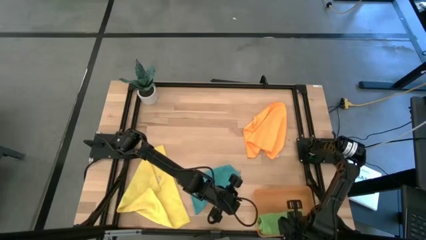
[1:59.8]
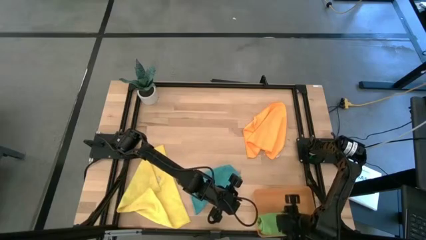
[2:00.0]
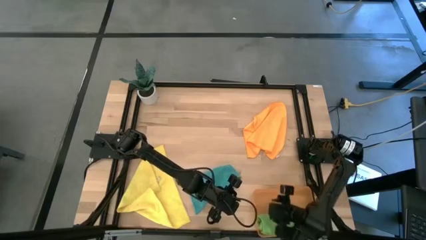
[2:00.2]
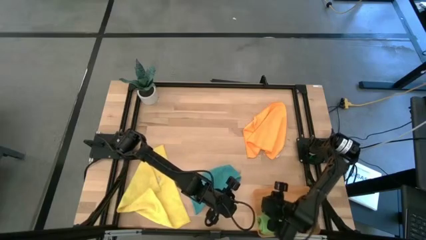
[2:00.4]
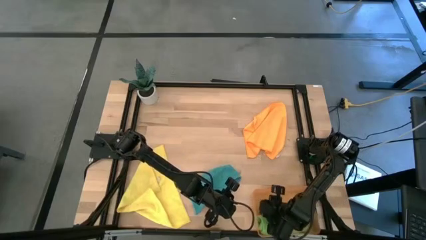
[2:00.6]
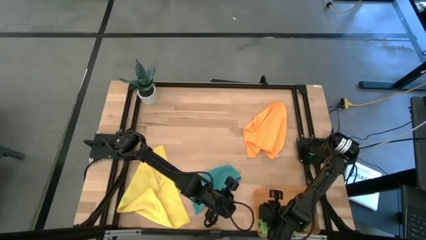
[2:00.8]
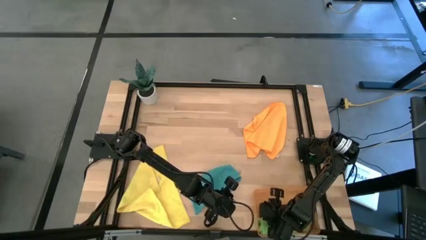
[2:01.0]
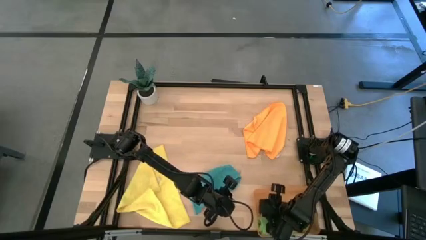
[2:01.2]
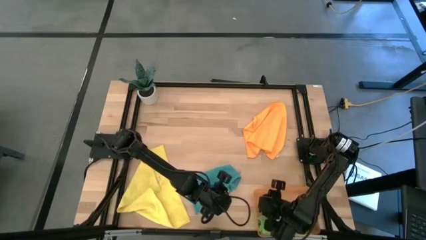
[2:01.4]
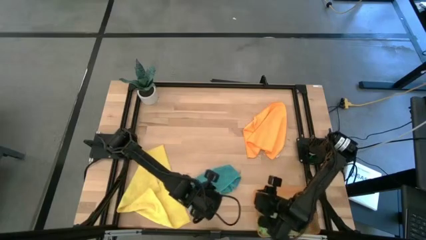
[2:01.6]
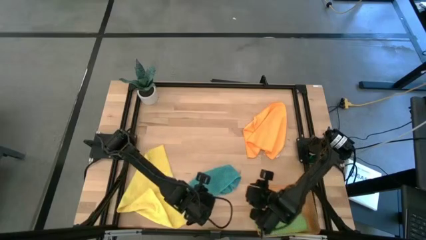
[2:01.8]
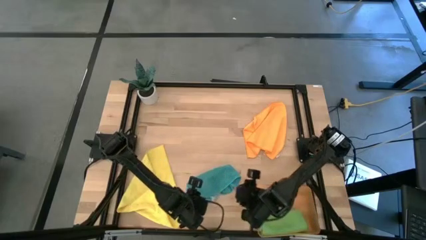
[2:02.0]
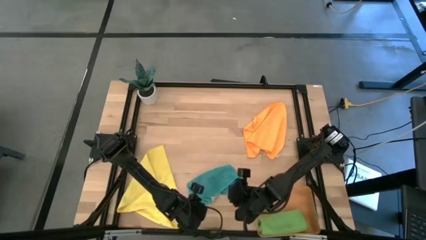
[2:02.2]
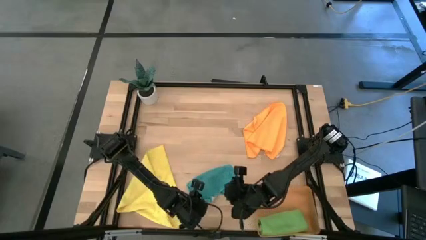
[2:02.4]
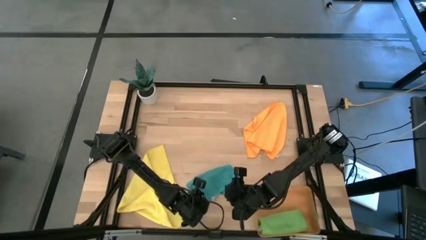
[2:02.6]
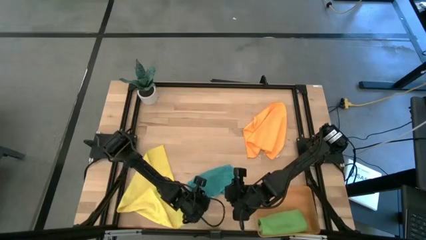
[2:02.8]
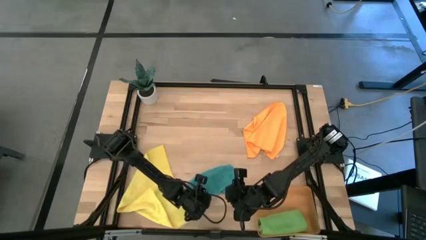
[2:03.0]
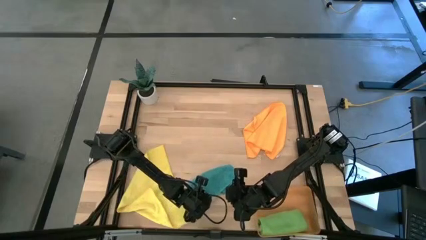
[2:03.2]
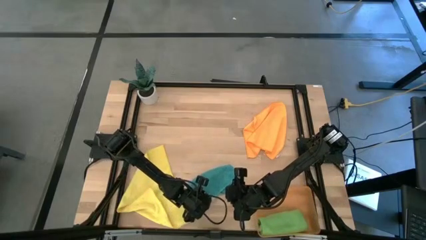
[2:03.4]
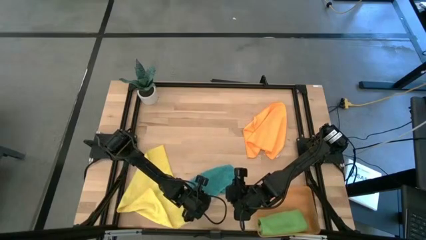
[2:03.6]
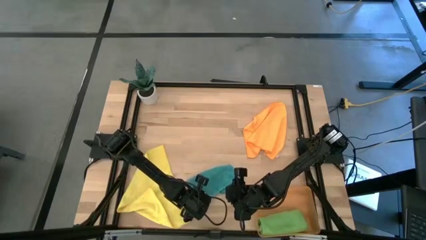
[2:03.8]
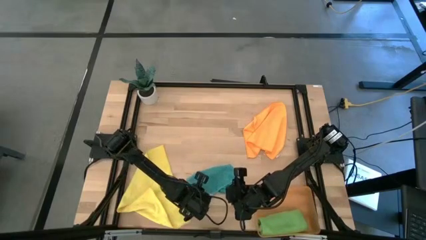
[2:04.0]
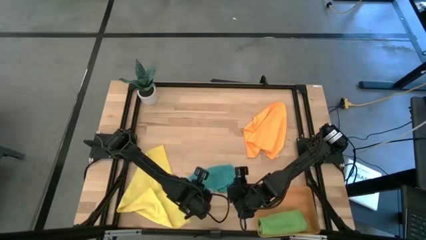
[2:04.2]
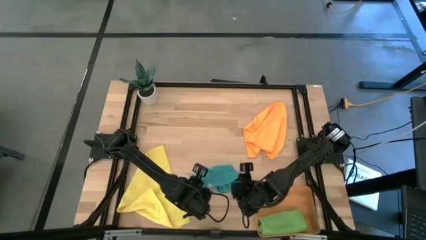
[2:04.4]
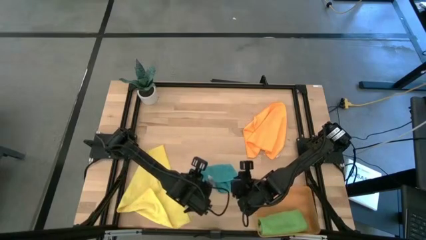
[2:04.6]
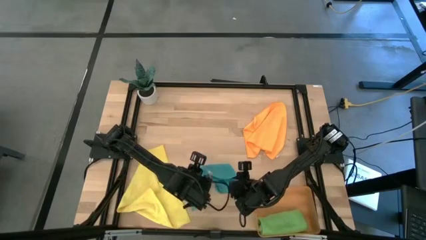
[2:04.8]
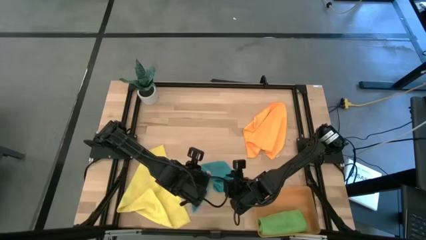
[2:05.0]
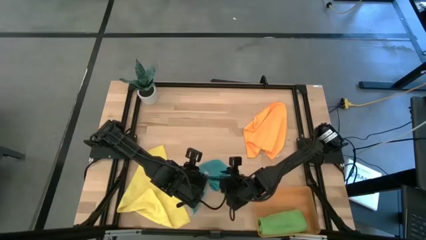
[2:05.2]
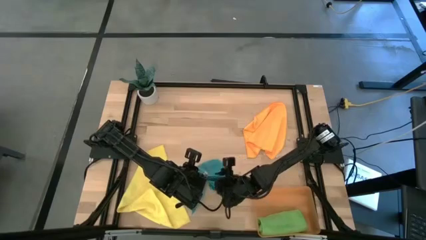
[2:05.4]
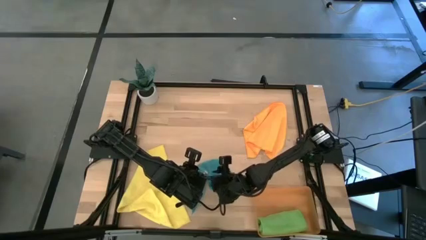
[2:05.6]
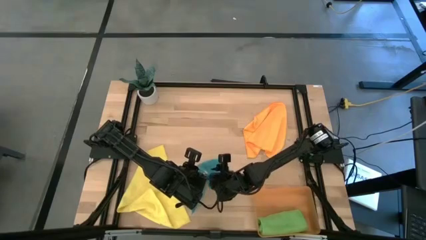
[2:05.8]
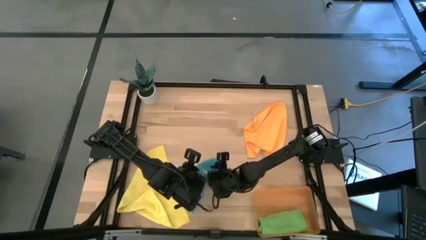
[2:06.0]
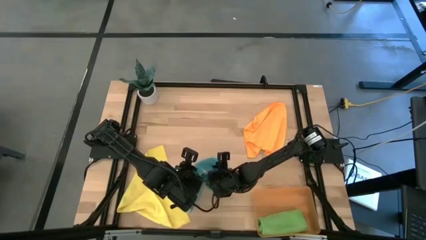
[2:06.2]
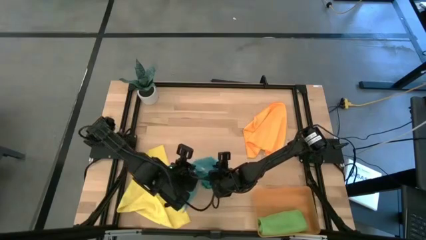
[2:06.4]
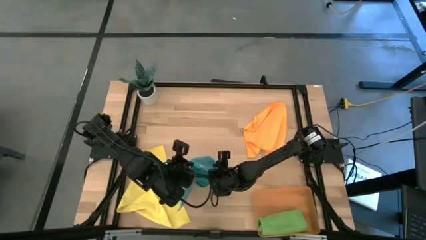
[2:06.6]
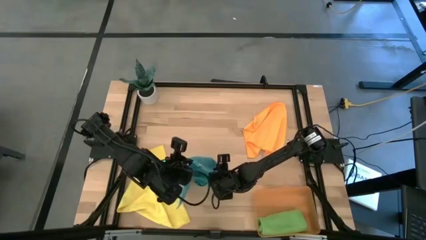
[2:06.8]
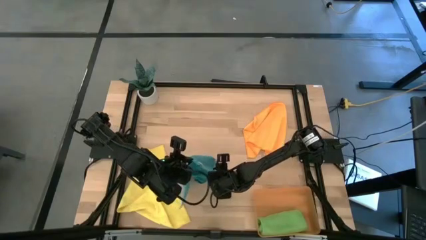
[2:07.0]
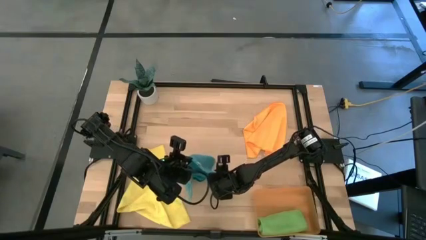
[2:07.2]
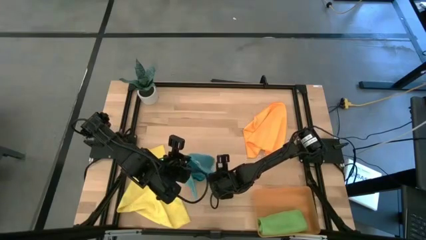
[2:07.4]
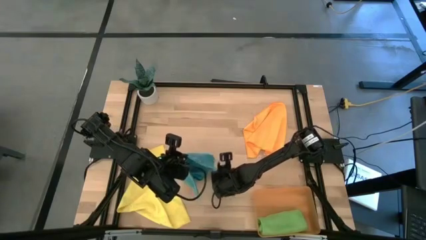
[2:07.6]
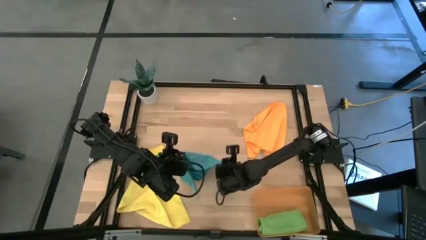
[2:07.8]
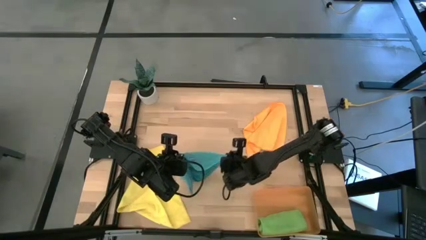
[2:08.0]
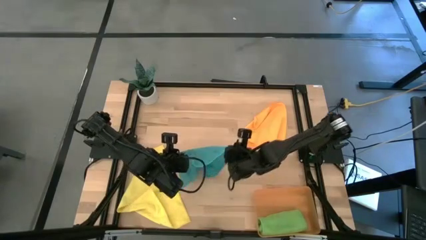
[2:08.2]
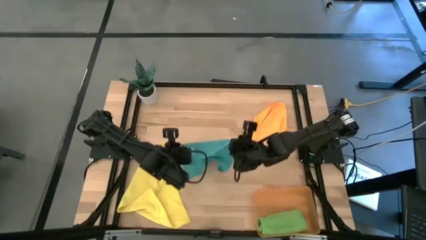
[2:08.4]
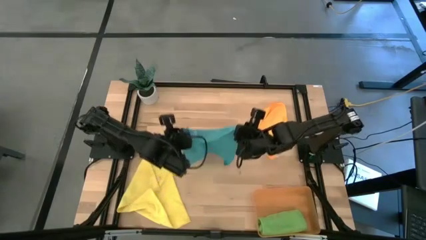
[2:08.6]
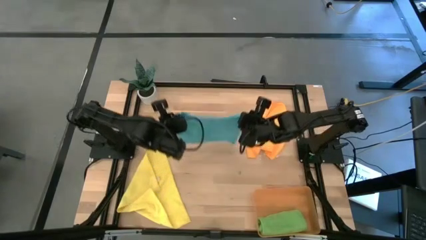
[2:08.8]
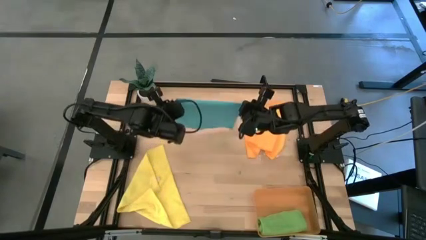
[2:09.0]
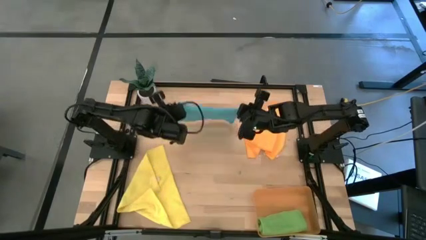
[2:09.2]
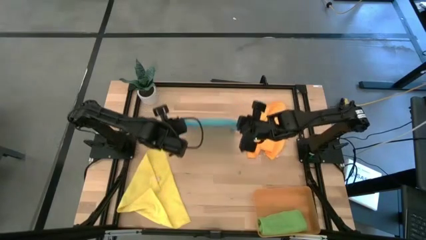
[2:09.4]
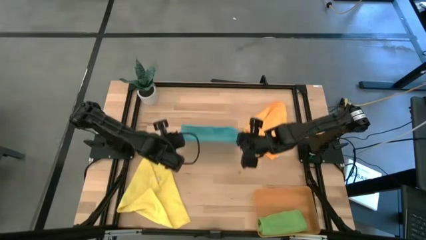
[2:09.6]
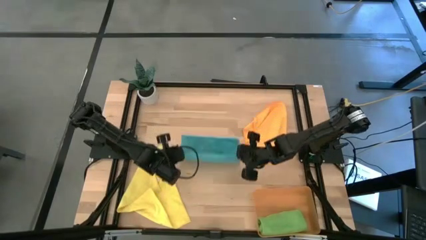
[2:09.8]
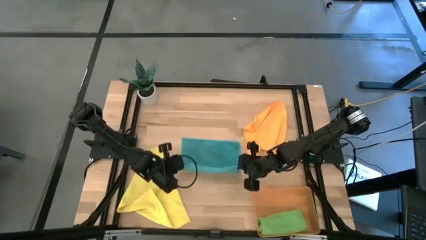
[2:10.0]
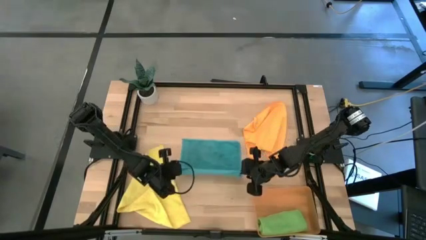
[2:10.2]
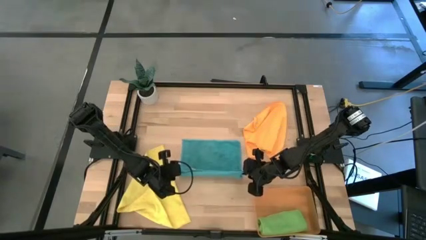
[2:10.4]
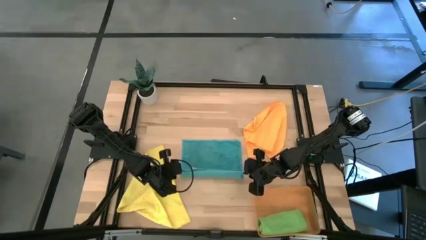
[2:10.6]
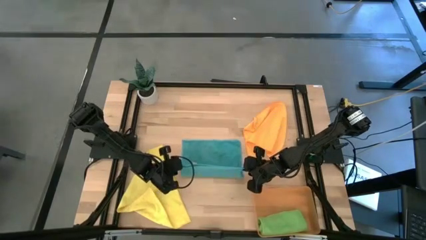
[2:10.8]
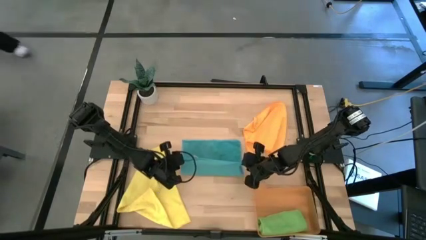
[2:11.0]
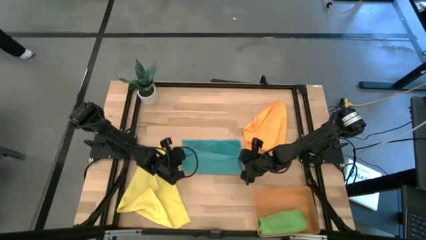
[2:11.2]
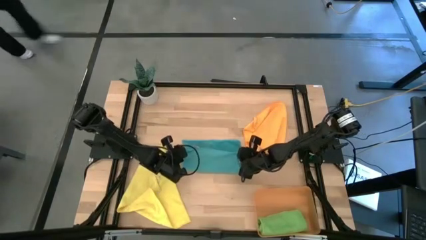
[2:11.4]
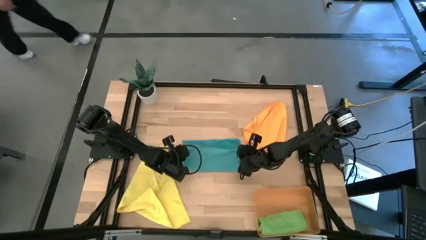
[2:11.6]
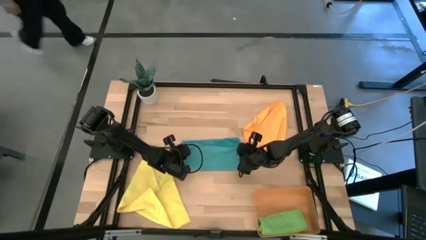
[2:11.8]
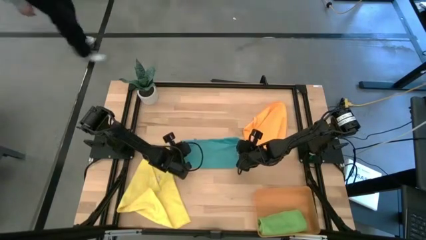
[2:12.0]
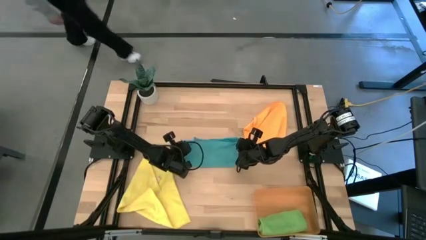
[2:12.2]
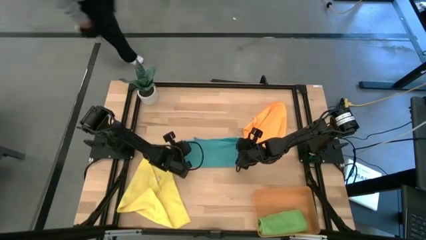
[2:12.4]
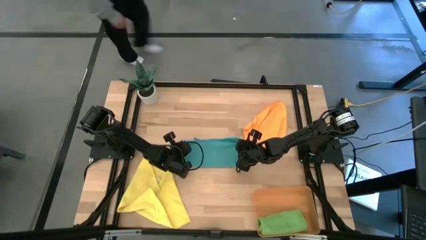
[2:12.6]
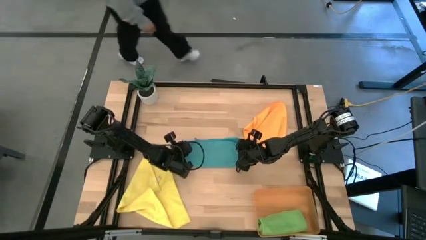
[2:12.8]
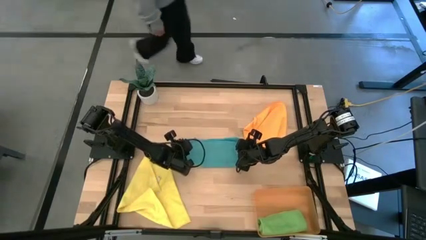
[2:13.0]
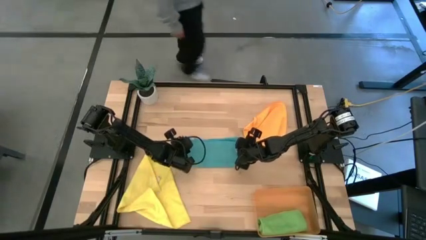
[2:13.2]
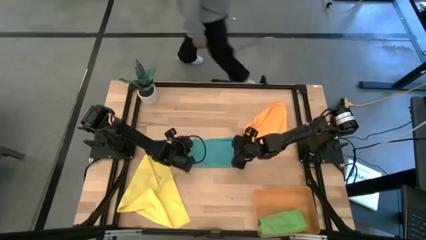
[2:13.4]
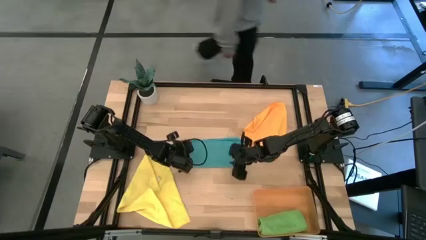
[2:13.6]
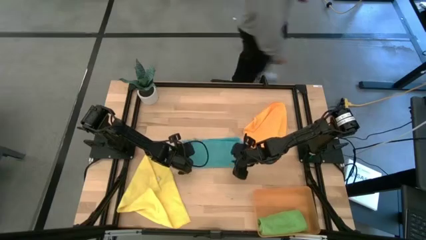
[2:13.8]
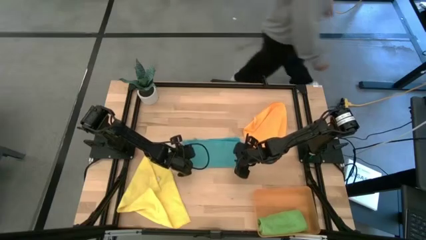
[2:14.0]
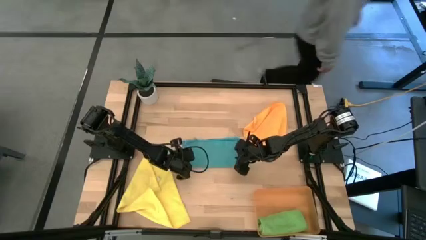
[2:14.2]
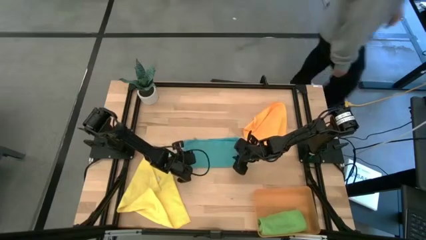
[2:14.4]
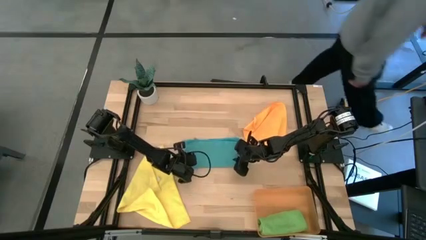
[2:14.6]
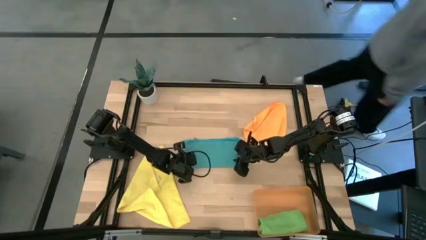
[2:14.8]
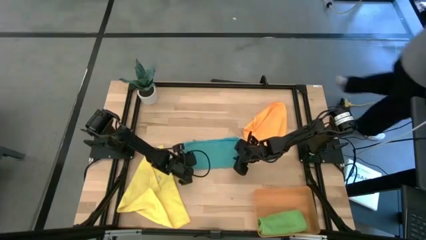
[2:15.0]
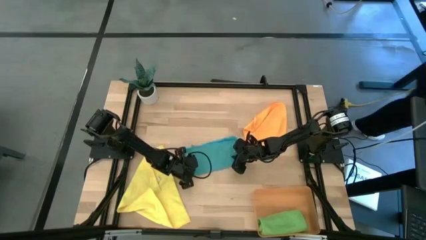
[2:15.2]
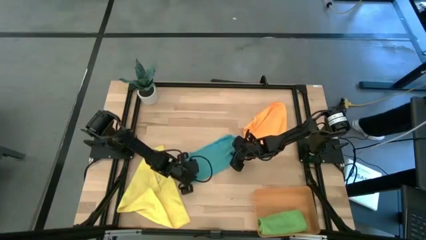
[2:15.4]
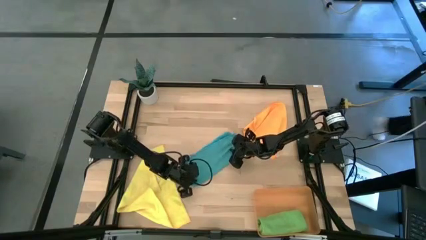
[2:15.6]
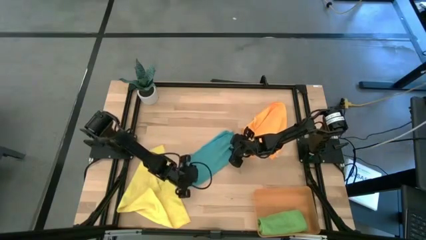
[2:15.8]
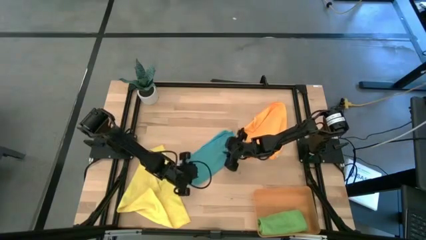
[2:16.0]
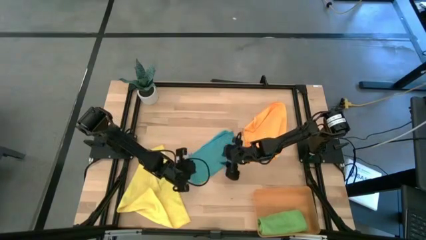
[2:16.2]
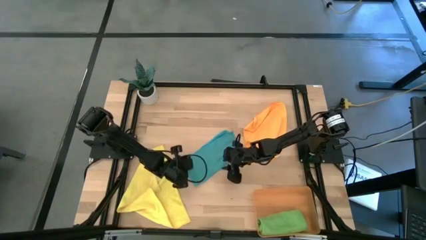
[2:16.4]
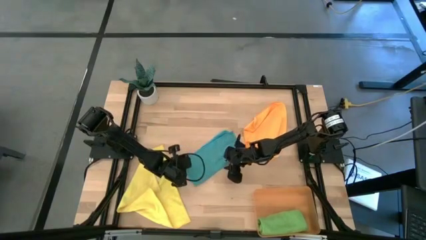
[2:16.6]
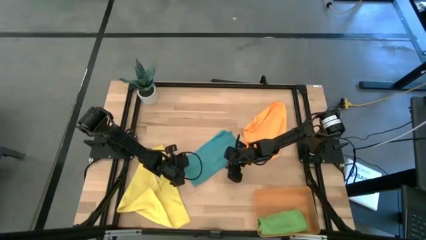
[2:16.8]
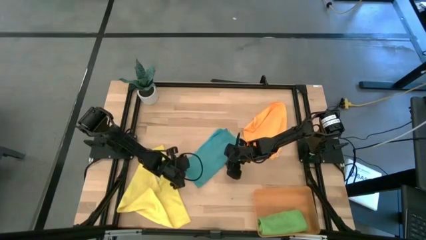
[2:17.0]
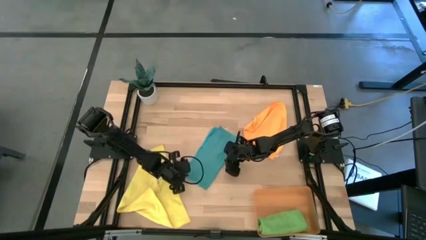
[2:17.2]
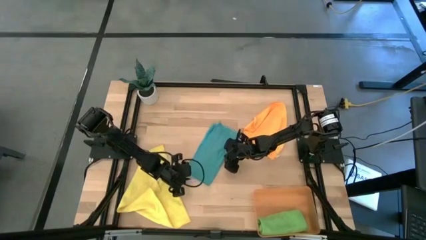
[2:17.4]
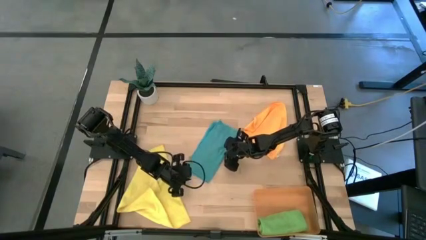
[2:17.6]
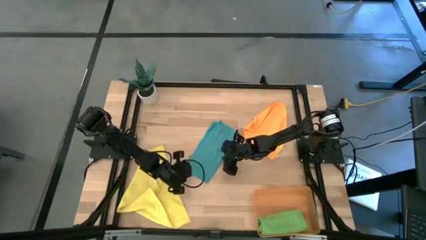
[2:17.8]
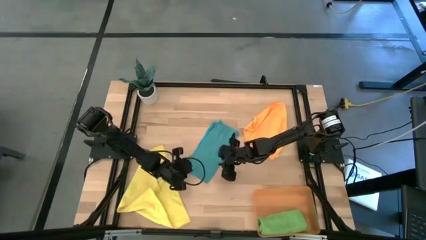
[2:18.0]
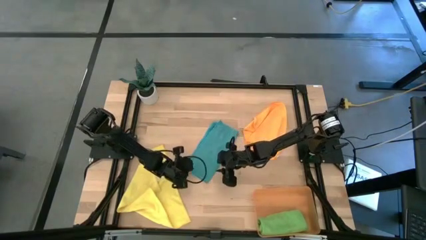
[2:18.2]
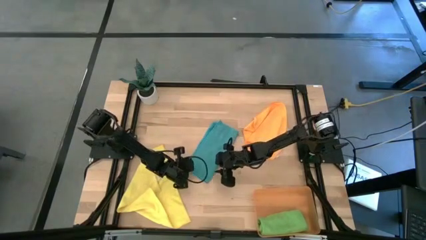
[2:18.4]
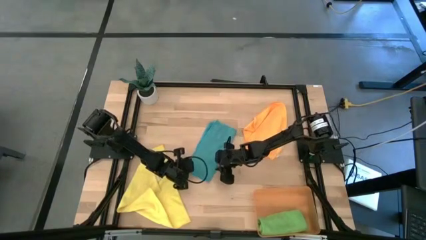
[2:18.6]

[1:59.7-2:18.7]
Task: Roll microfiber towels into tight, uniform cylinder then place into a basket
Roll the blue microfiber towel
